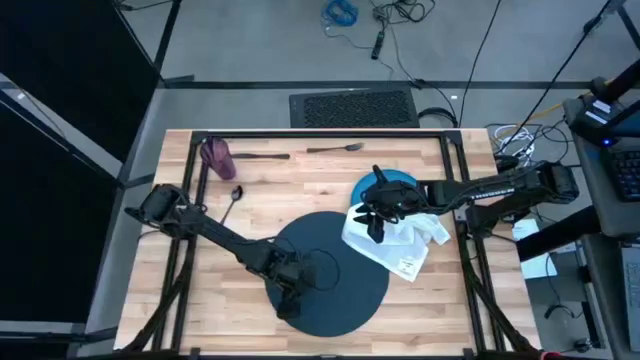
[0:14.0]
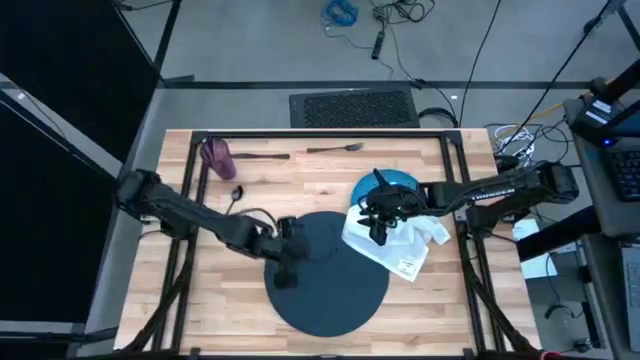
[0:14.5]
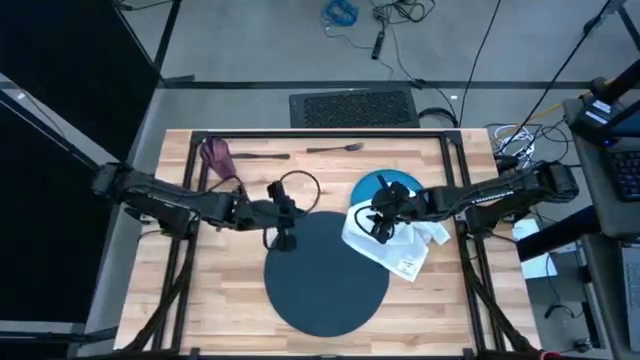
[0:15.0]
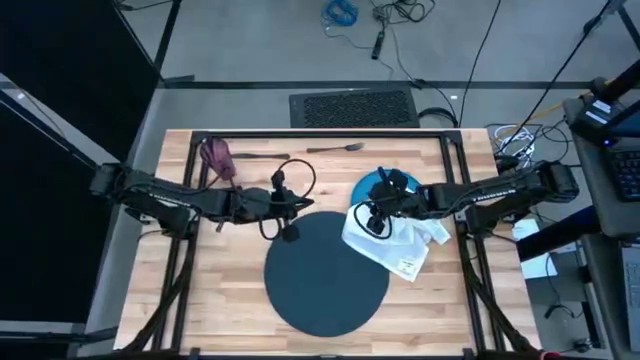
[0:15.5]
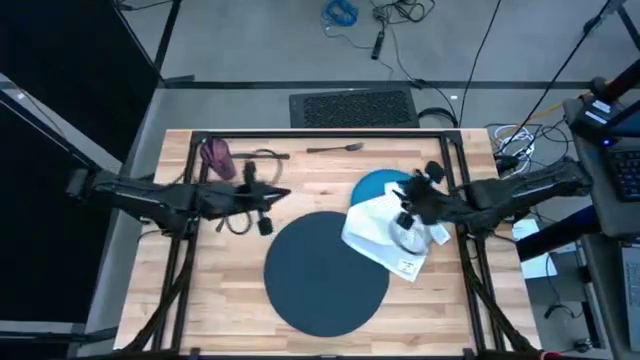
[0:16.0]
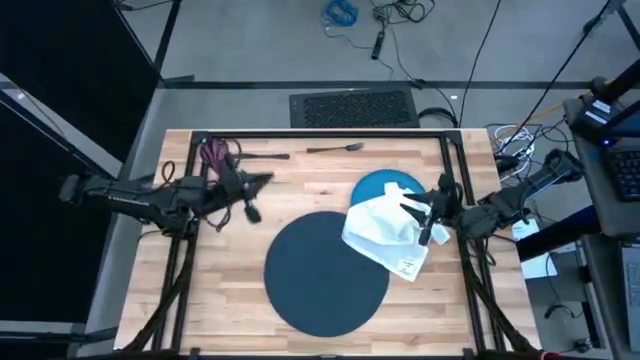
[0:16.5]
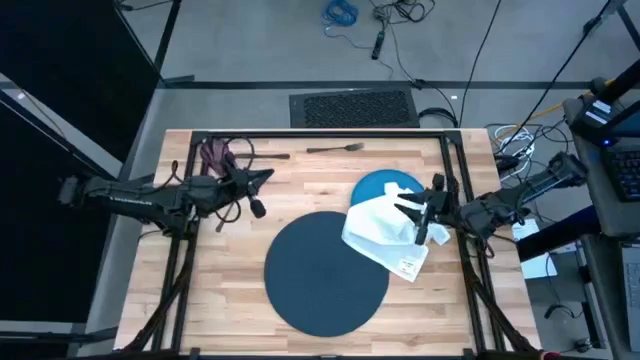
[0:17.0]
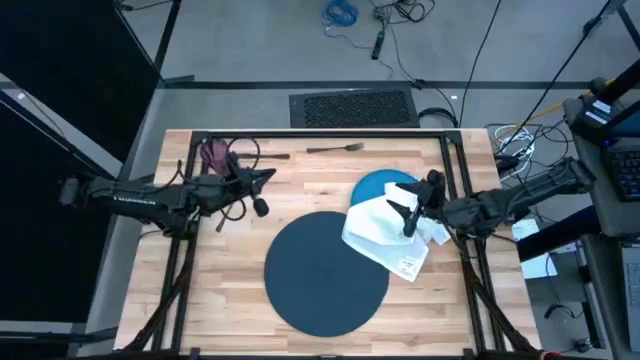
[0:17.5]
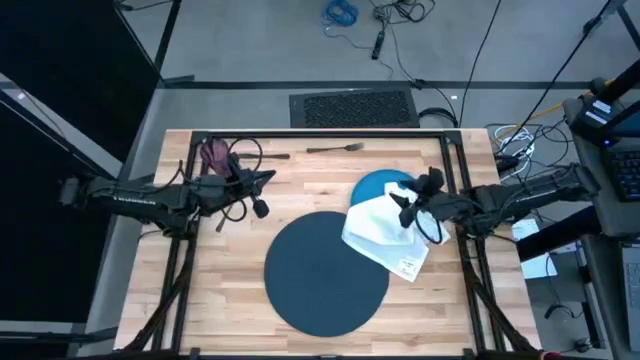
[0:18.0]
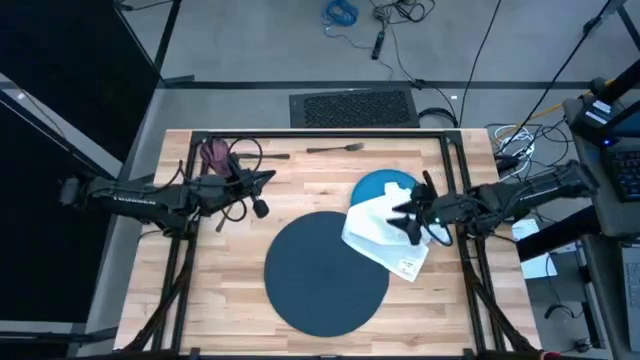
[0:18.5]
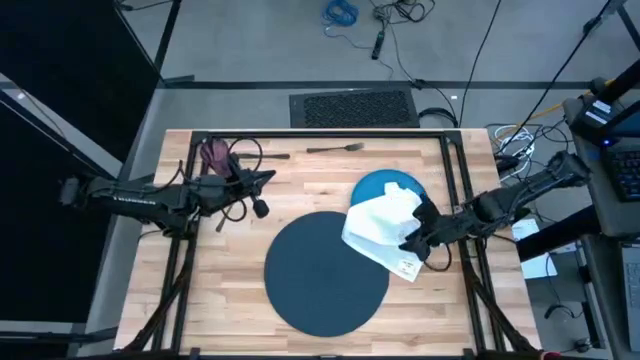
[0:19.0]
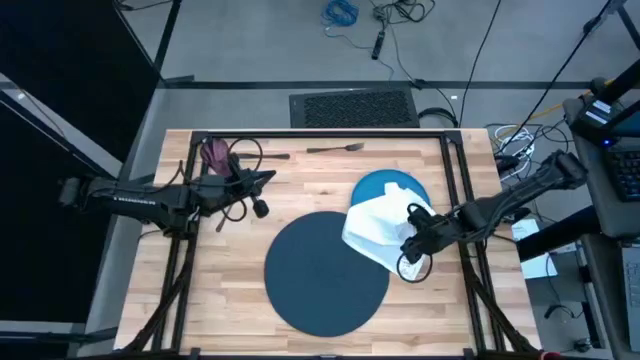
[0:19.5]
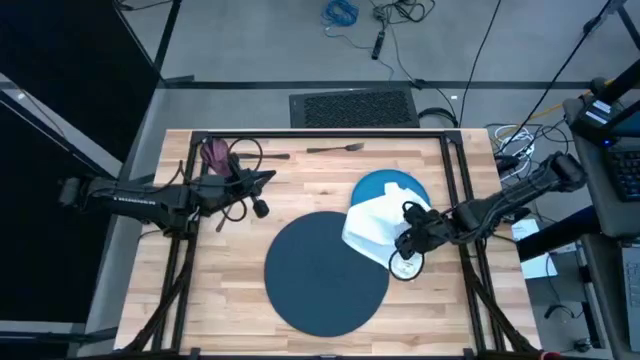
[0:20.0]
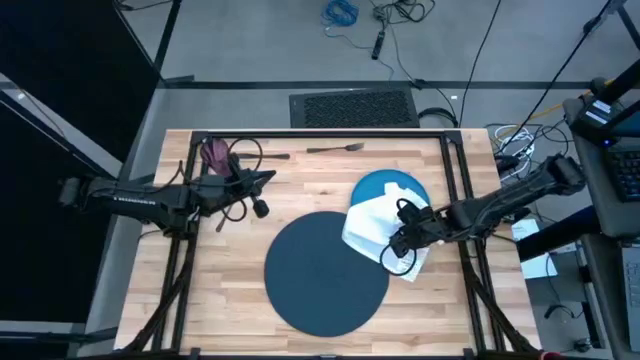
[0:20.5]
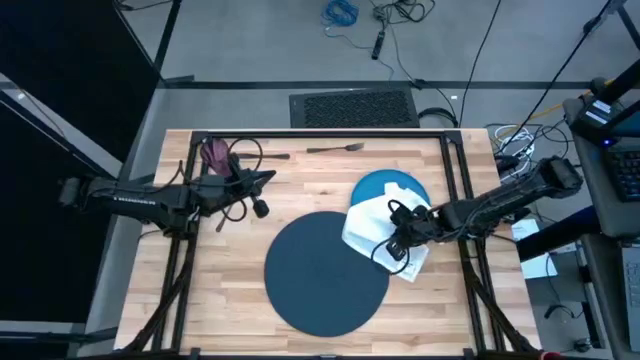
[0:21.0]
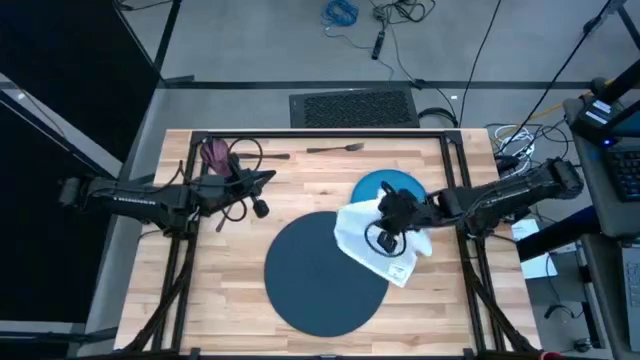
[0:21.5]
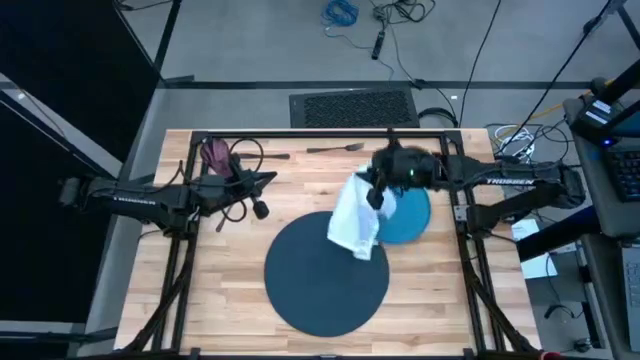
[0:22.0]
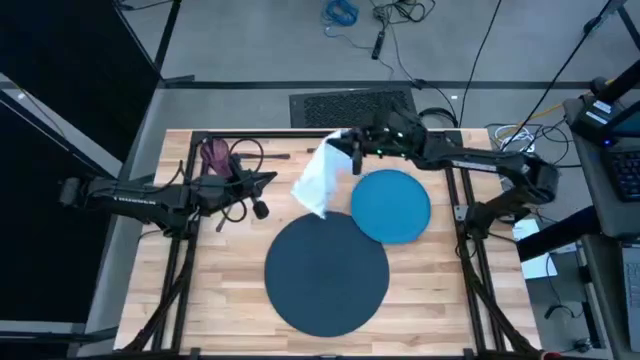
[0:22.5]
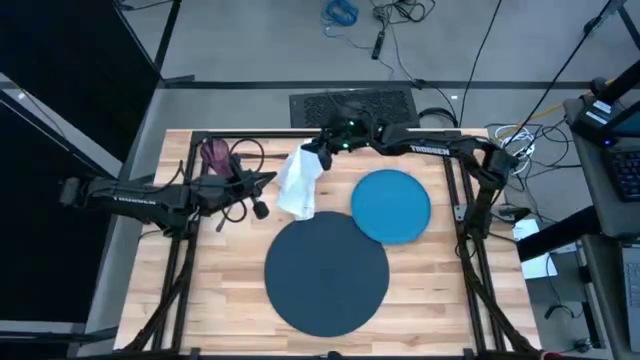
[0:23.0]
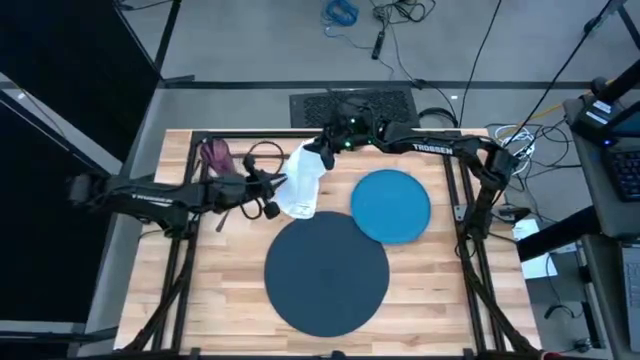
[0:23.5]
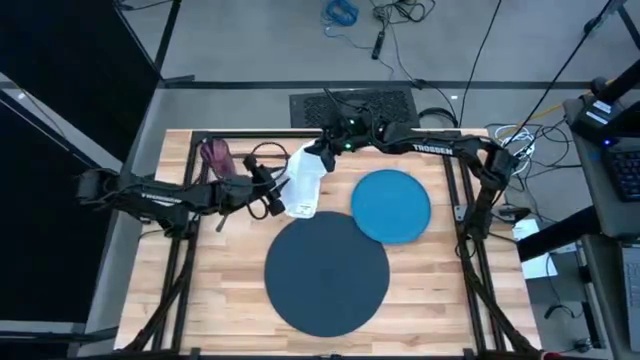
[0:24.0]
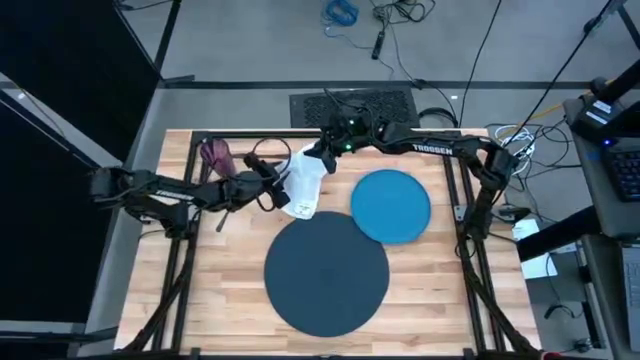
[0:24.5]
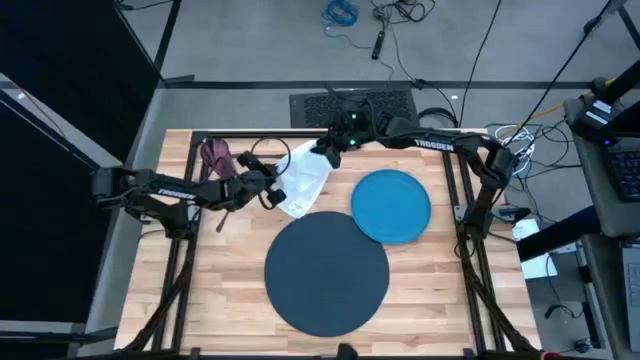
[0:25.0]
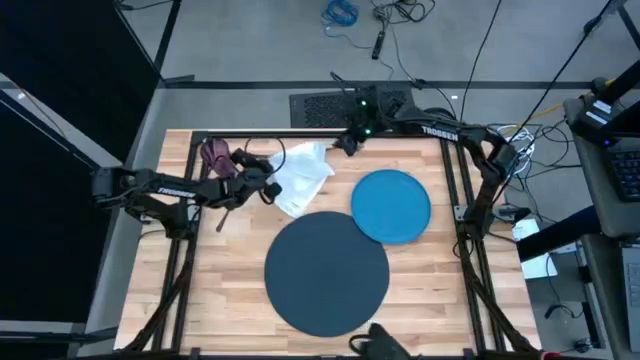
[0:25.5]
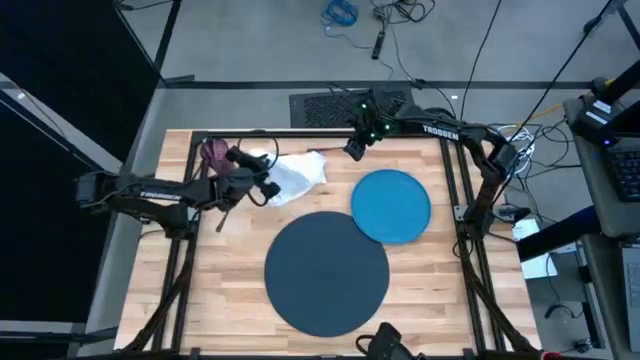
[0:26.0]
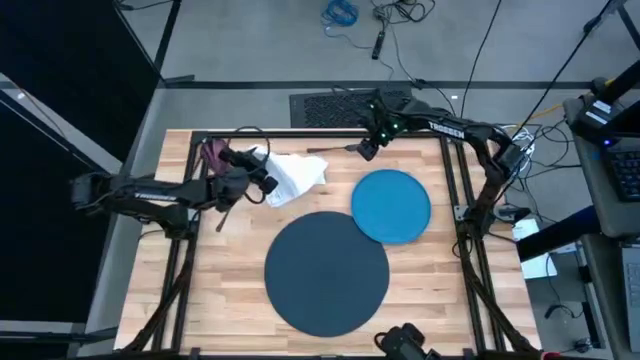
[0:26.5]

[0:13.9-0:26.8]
Task: Set table place
Move the table napkin from the right to the top left of the table

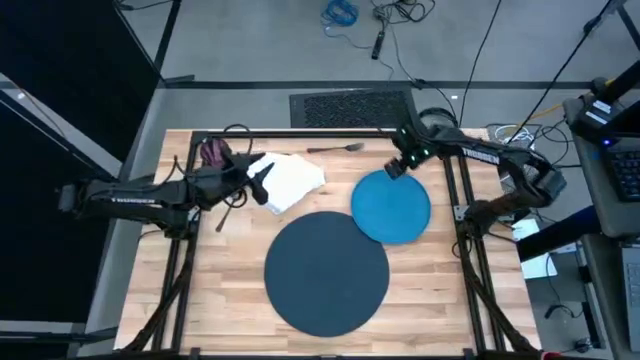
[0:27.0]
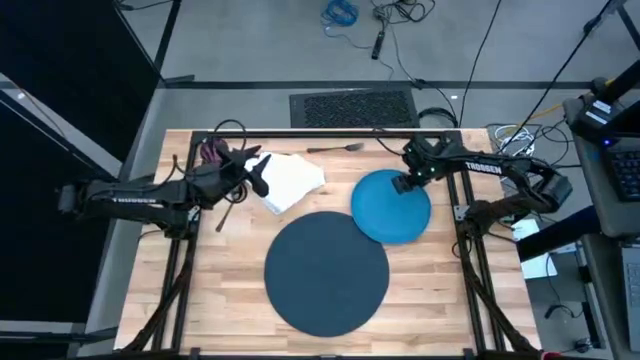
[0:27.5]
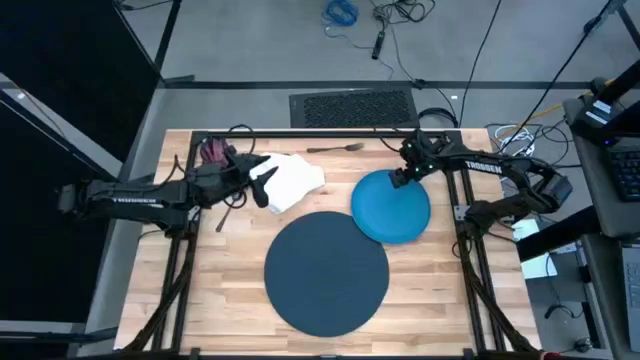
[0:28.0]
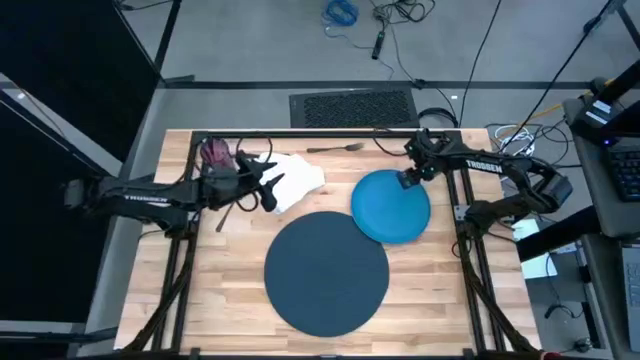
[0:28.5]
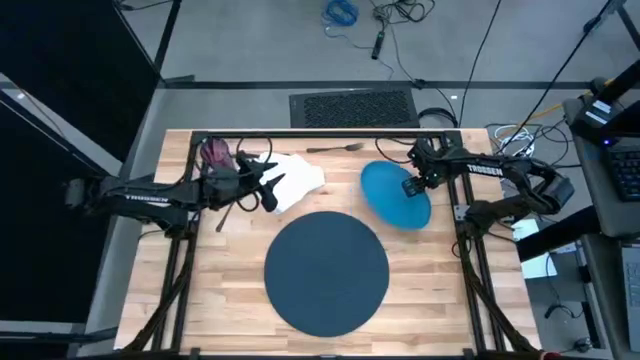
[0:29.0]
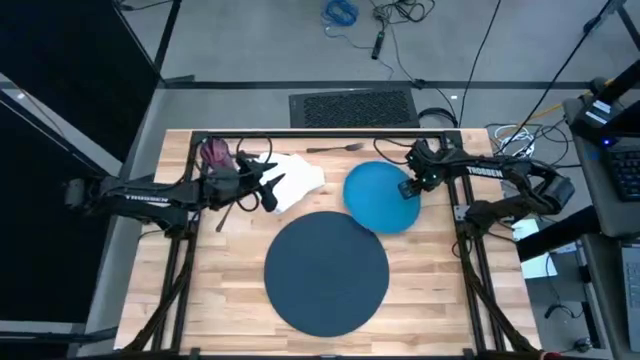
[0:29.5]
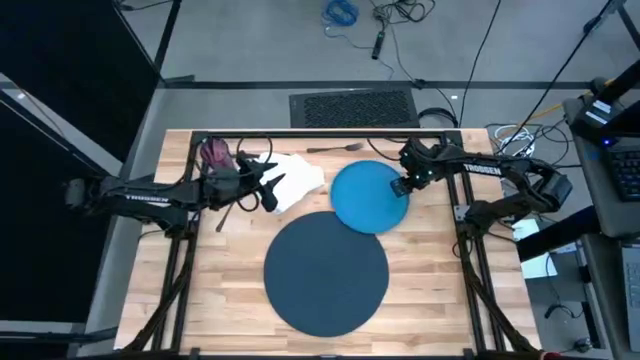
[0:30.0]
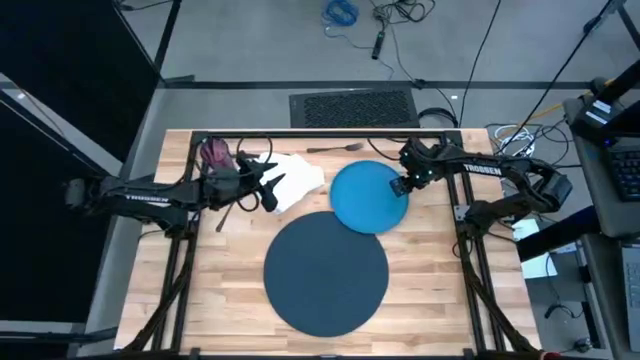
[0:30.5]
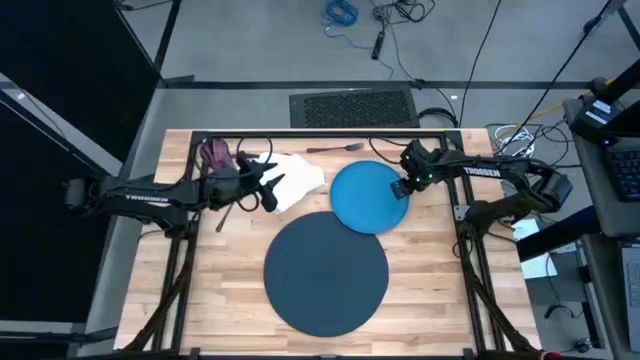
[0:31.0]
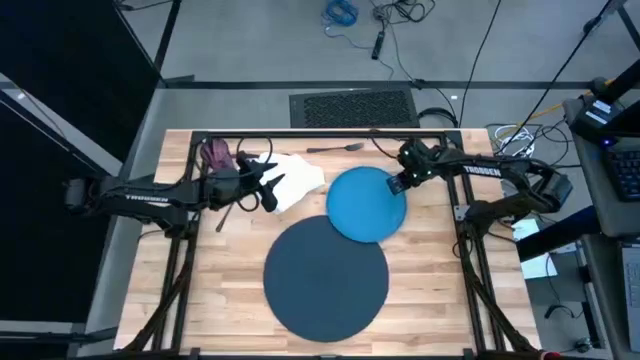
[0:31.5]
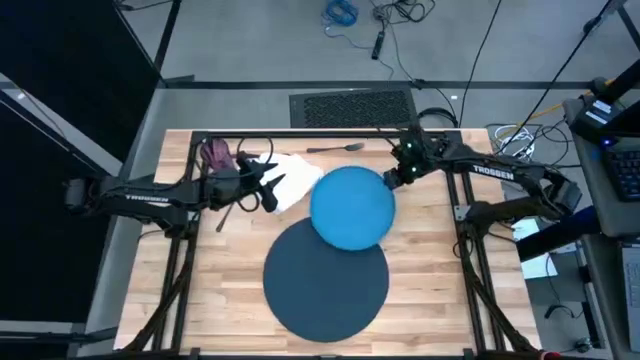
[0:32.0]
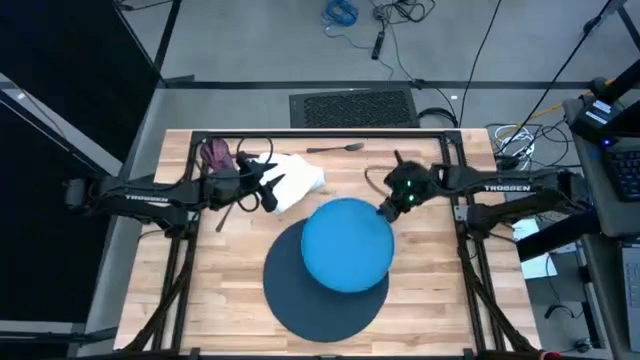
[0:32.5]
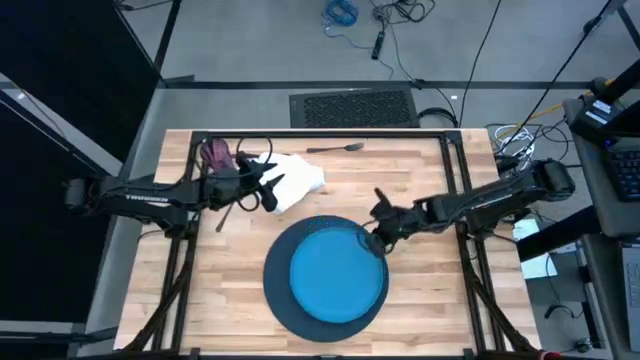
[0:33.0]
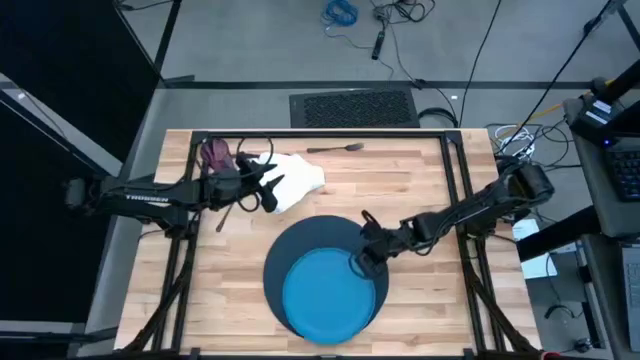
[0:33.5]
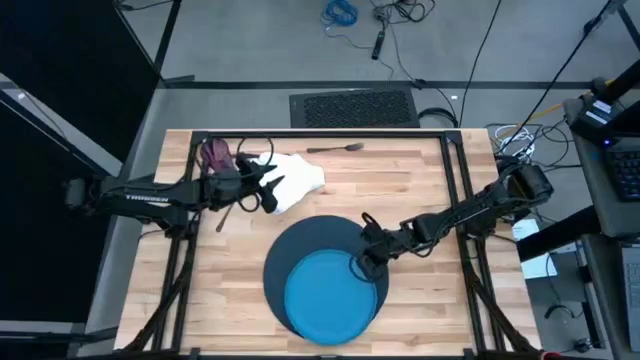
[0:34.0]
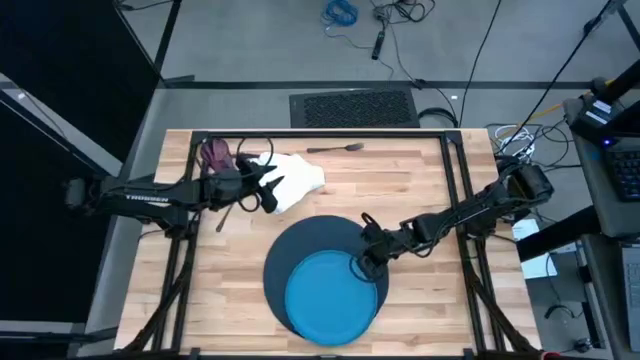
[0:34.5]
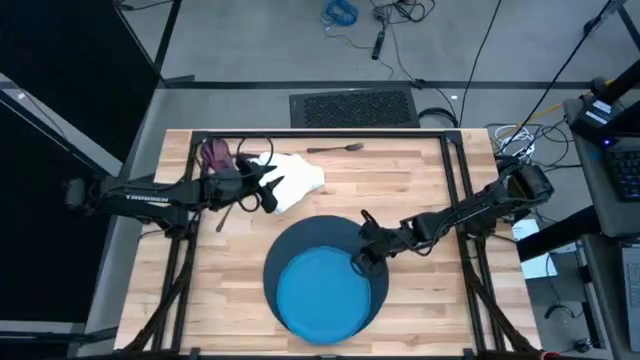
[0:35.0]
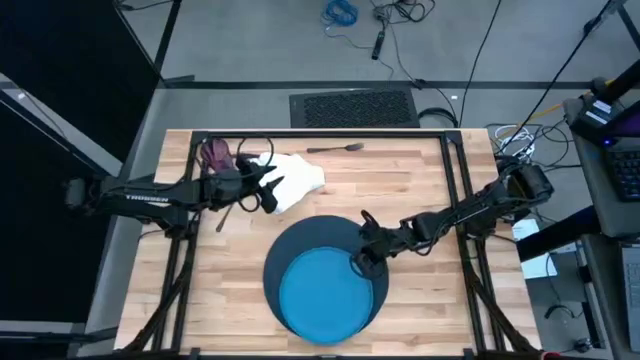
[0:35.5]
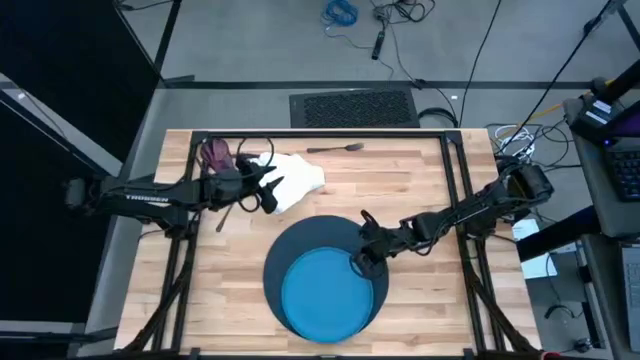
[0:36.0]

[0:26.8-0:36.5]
Put the blue plate on the table mat
